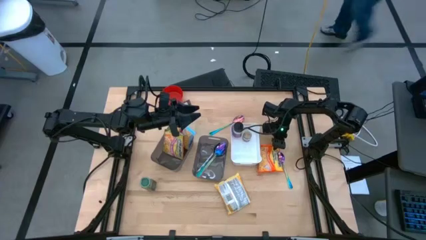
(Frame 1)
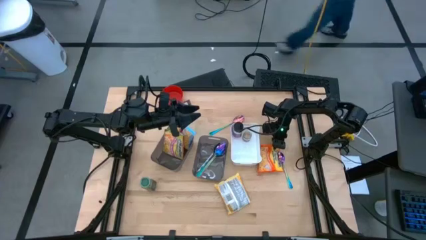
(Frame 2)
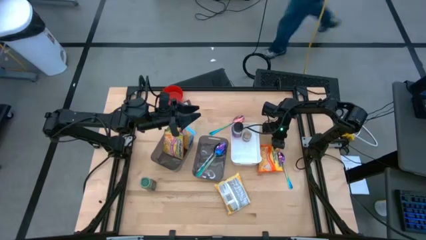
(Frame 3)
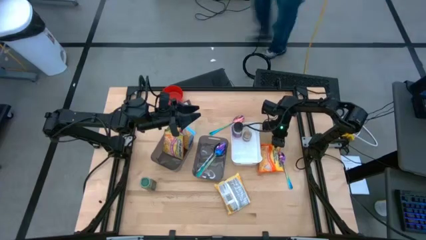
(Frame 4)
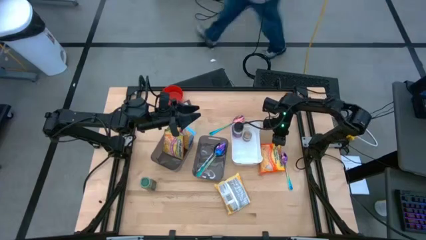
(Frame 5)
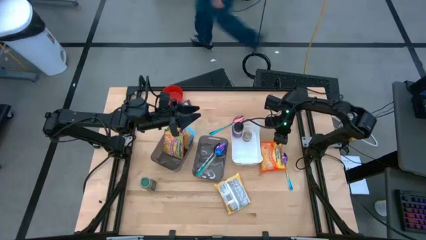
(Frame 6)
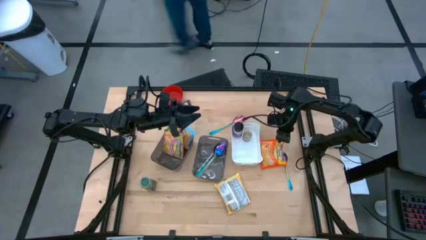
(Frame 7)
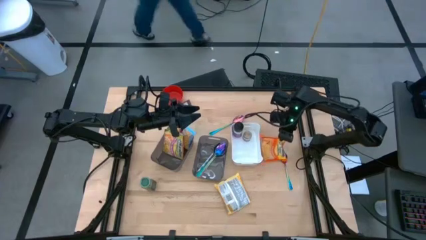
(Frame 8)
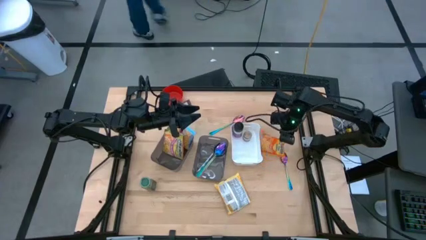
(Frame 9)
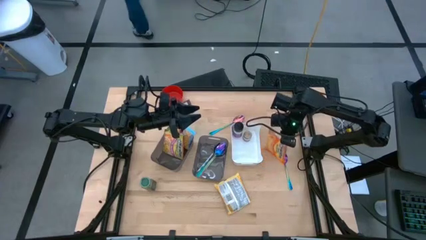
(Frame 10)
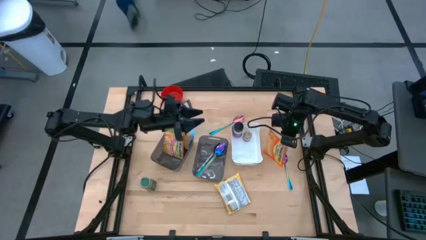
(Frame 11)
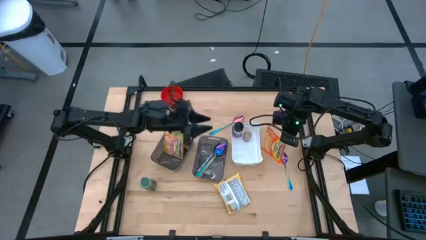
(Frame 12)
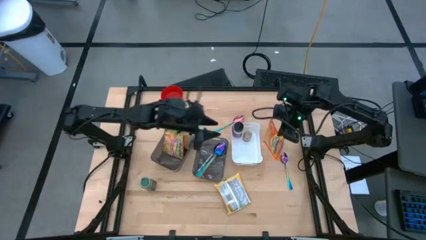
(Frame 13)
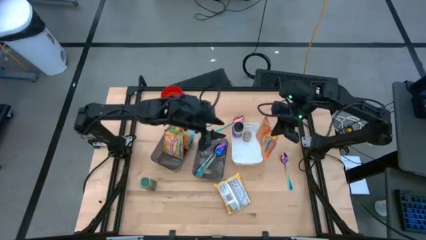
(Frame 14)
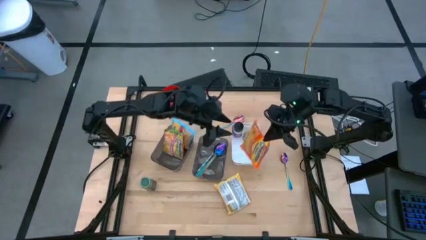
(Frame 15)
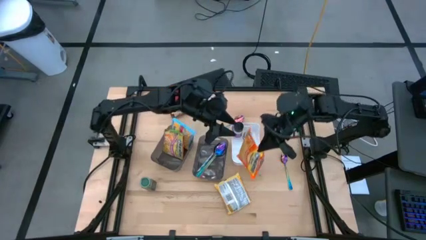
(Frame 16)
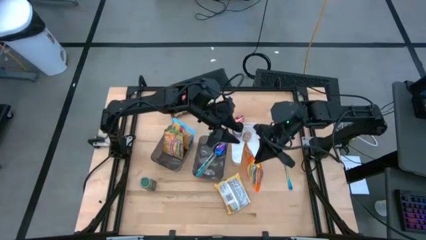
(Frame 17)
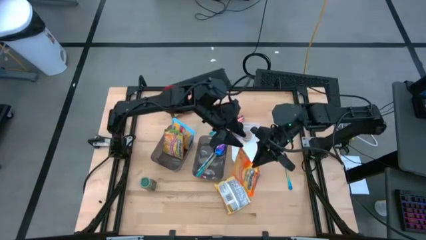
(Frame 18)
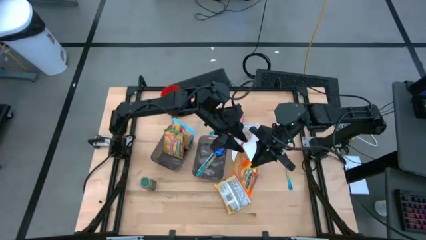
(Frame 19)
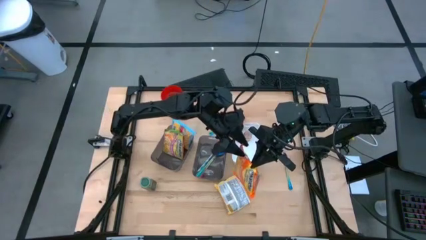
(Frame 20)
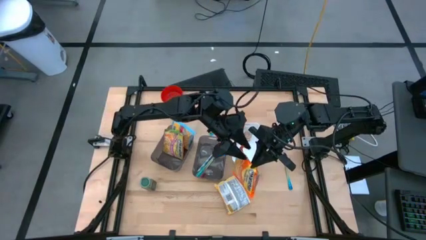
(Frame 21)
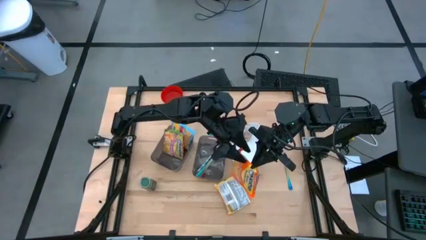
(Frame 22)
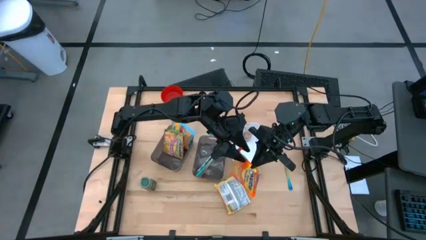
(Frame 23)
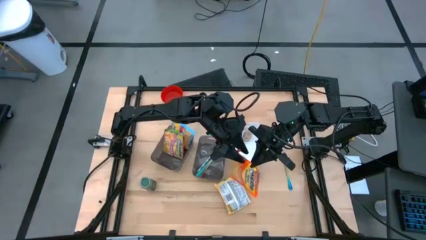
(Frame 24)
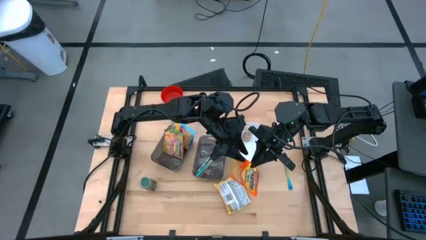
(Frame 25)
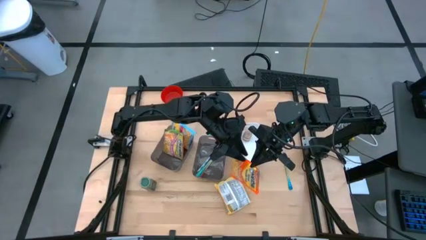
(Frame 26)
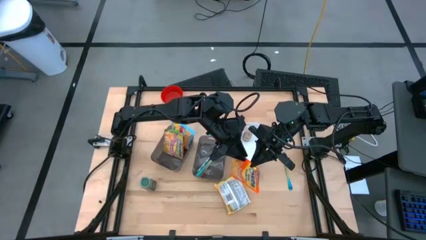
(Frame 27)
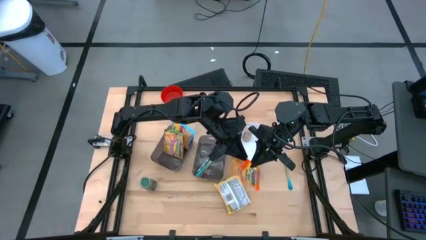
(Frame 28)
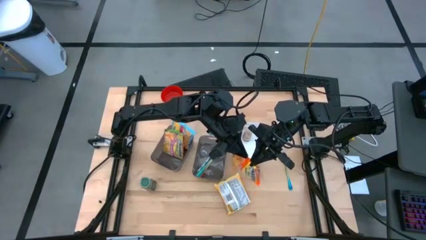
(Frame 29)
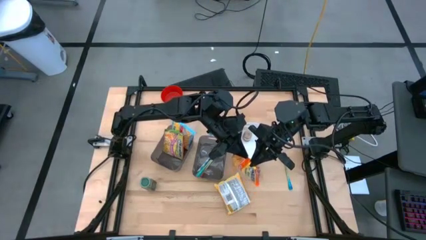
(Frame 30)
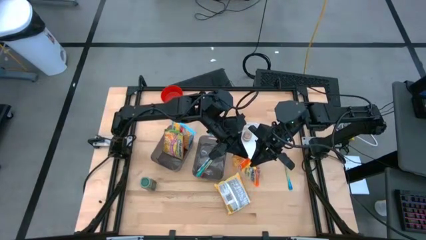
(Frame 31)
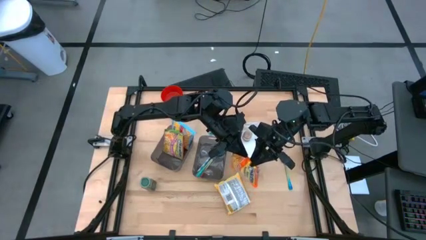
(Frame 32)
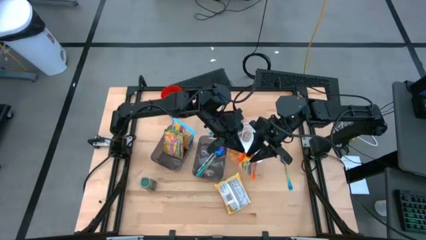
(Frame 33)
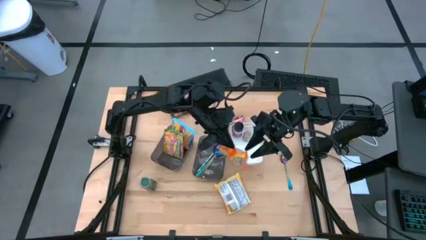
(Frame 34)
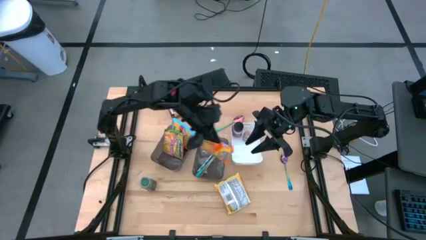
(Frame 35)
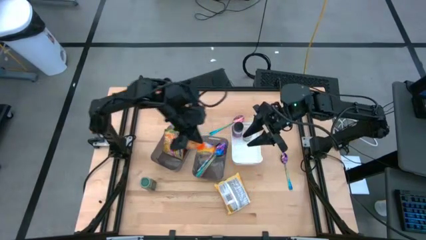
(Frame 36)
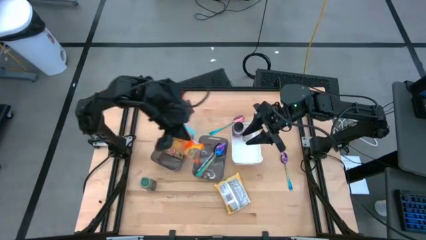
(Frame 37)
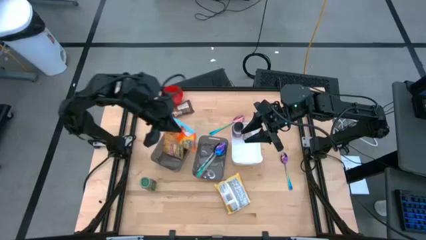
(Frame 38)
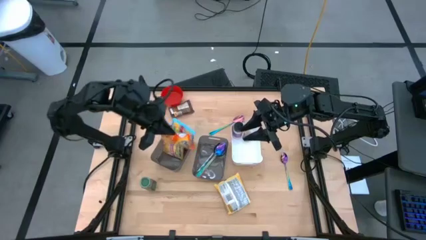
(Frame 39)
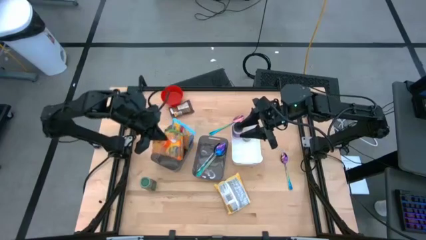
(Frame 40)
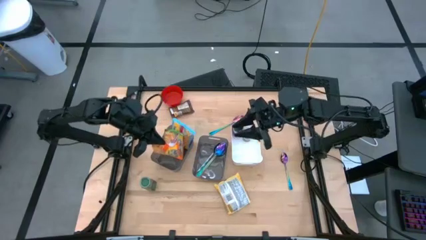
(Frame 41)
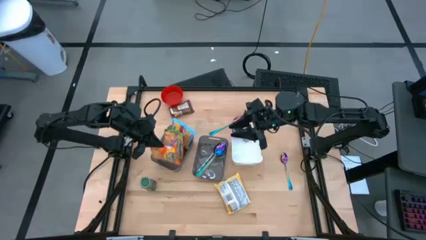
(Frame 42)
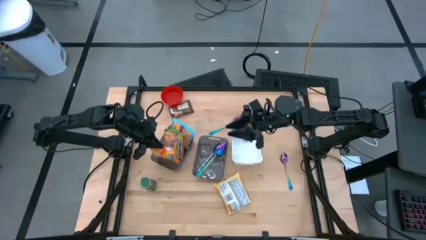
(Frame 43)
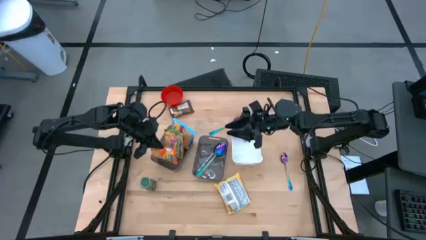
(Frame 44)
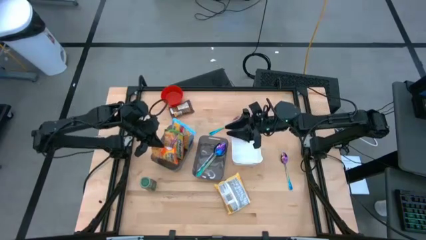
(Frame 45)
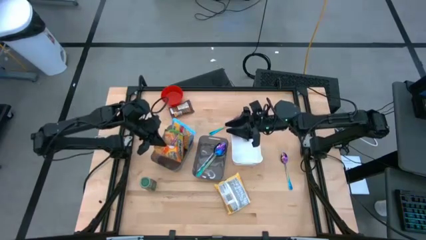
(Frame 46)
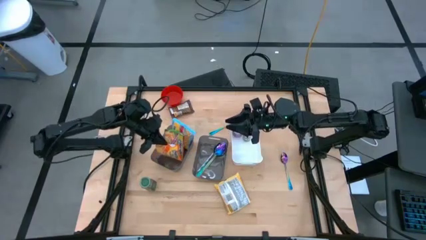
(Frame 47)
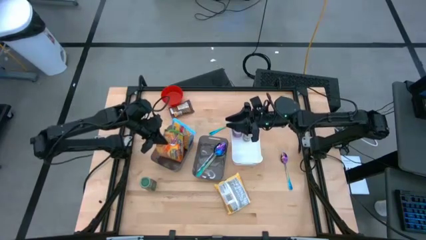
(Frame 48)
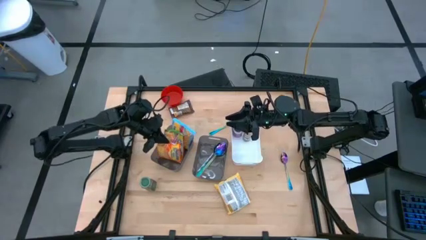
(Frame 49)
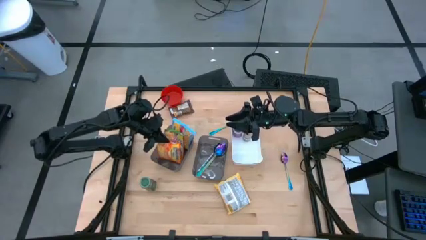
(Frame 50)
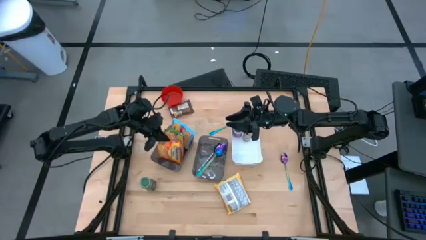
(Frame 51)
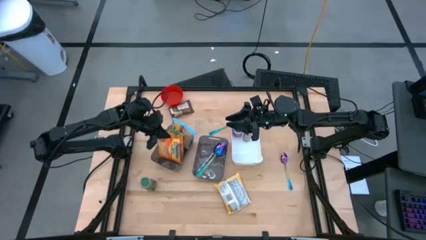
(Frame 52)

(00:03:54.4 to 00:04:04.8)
Task: Pick & Place Food Item
Put the orange pack into the left gray bin

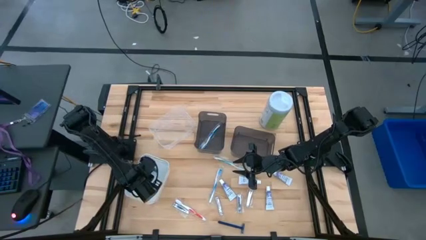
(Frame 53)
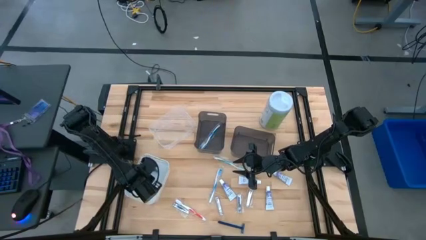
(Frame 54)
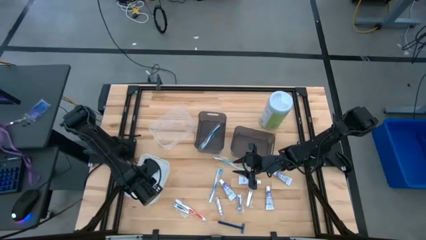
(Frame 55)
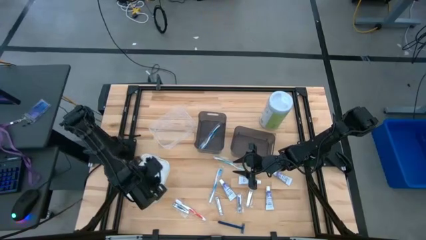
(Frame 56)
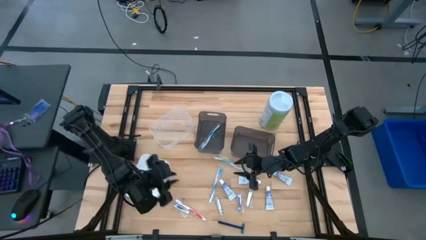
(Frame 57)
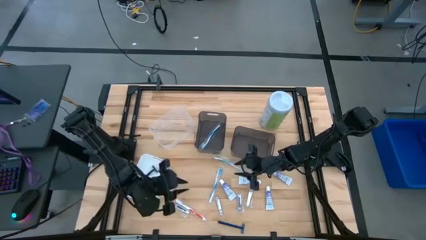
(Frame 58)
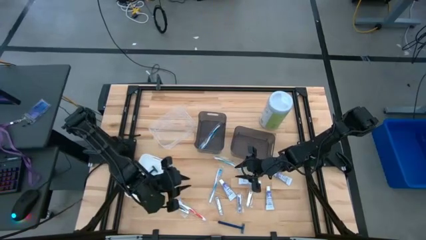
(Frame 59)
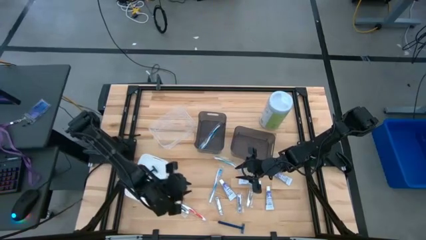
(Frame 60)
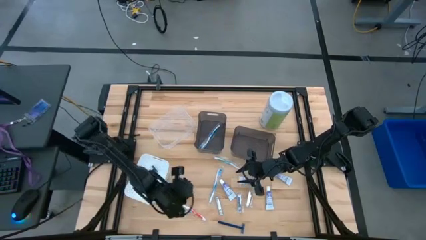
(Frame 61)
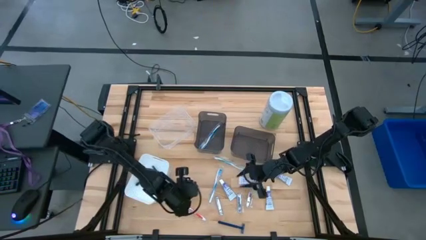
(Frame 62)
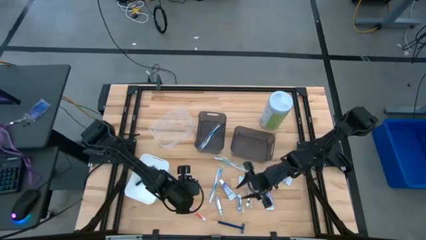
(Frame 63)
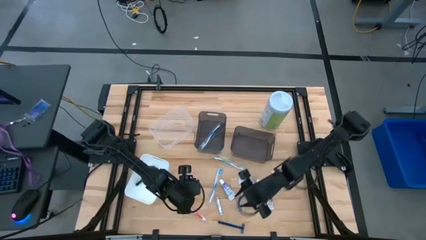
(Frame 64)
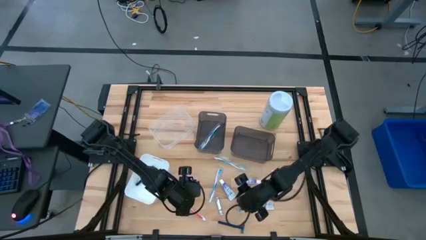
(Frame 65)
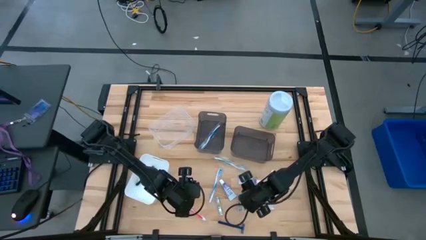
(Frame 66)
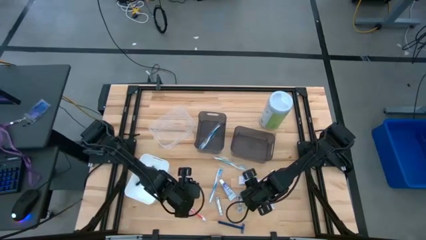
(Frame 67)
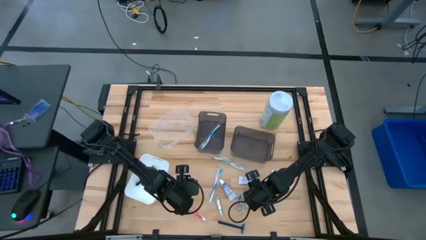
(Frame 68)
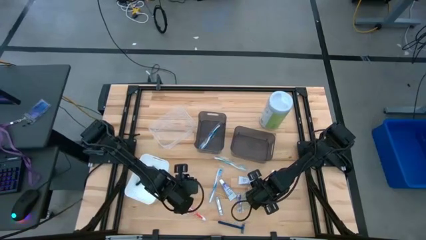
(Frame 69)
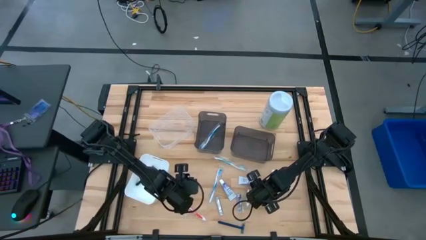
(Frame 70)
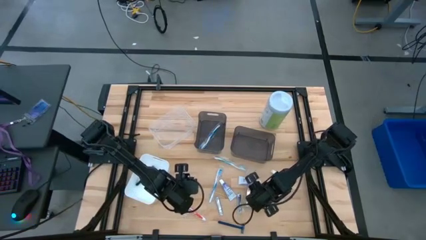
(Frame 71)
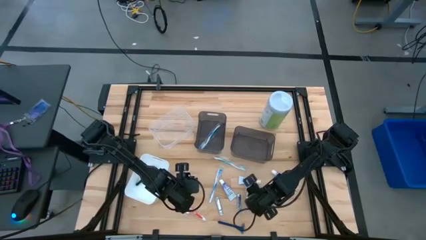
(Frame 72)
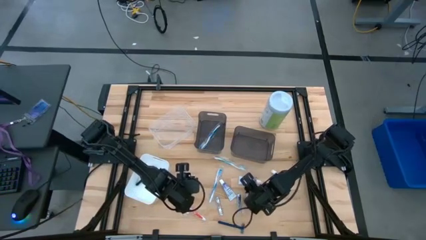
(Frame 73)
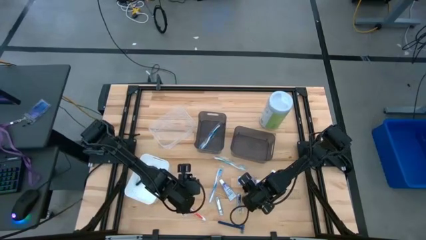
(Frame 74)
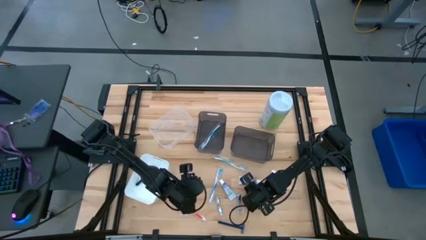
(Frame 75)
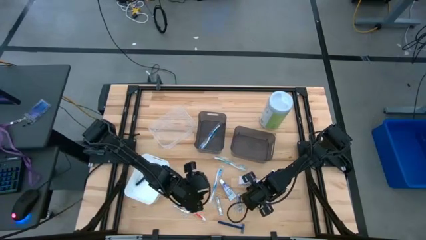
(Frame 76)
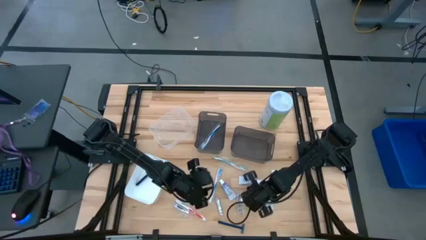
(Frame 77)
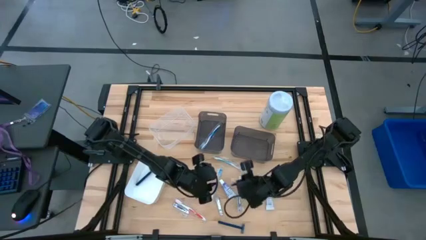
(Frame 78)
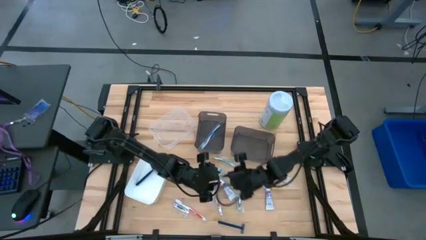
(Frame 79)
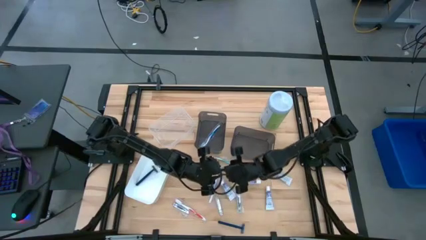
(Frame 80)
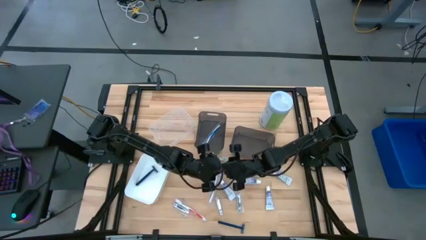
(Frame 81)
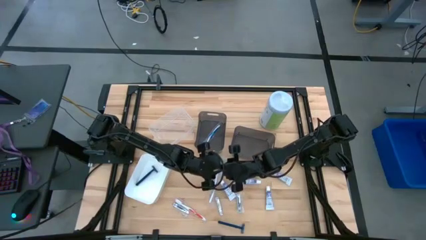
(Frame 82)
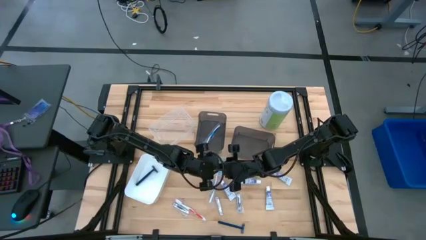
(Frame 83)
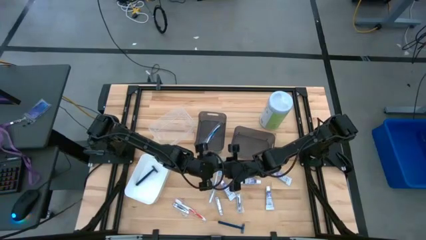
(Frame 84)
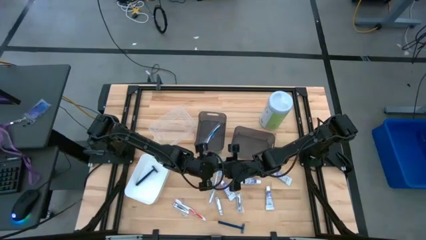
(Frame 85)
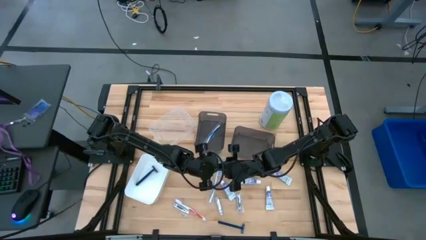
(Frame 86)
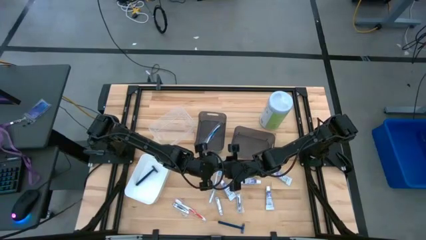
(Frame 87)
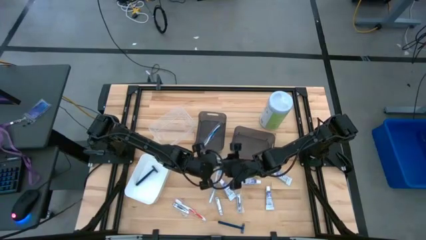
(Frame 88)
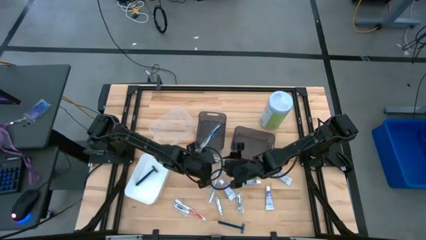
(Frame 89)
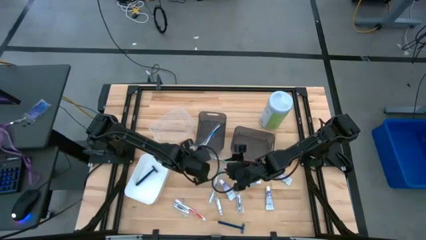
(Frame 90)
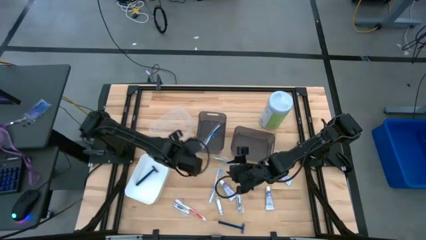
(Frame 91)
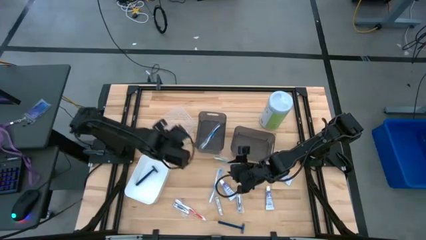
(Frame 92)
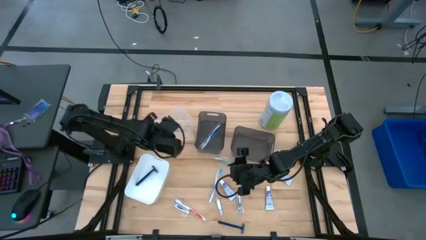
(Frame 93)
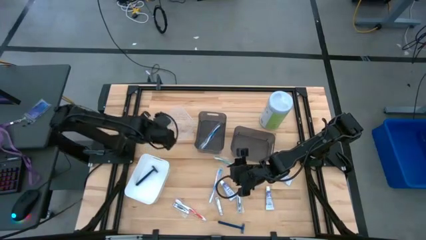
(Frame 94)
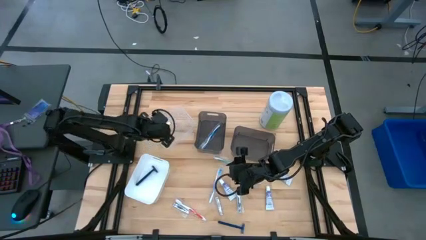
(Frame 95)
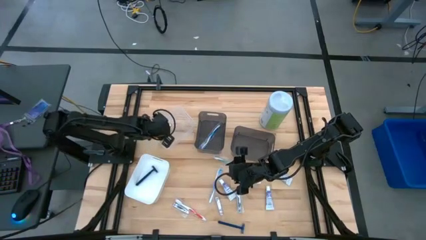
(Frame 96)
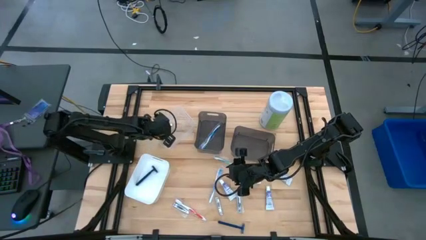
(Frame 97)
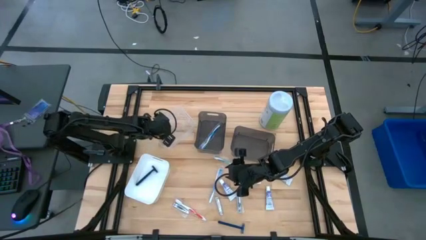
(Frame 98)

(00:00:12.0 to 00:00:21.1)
Task: Pick & Place Travel size toiletries
Put the silver nail cutter into the transparent bin
